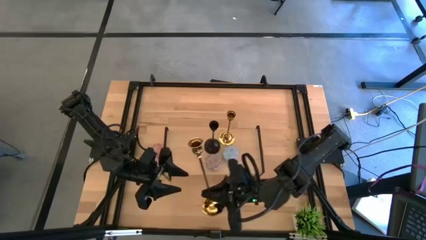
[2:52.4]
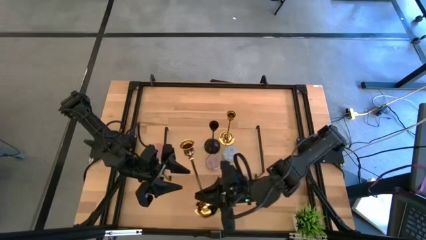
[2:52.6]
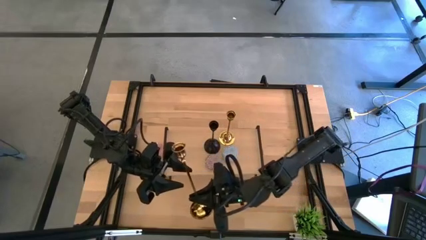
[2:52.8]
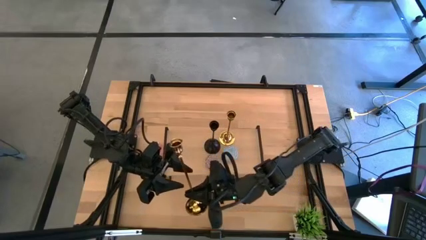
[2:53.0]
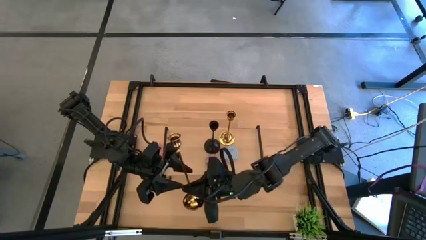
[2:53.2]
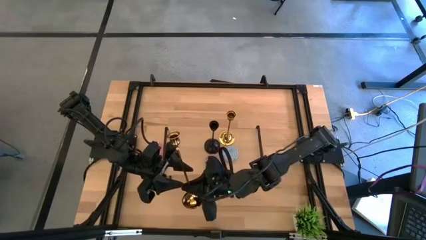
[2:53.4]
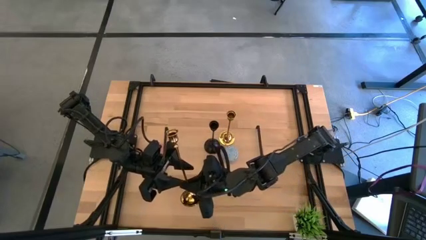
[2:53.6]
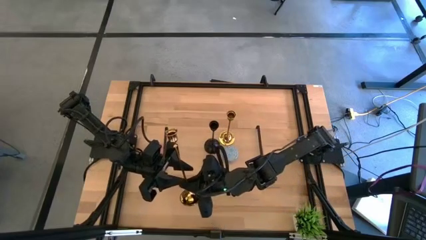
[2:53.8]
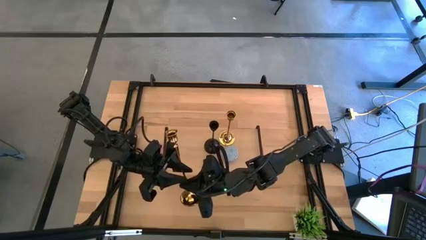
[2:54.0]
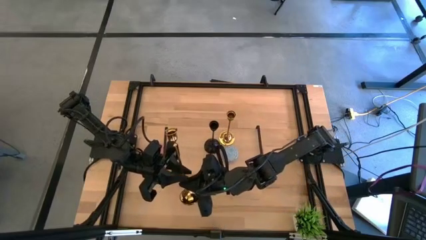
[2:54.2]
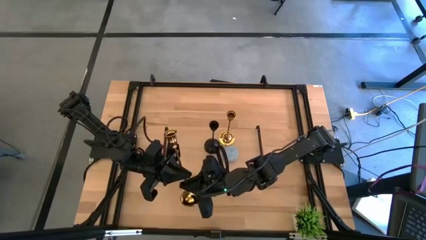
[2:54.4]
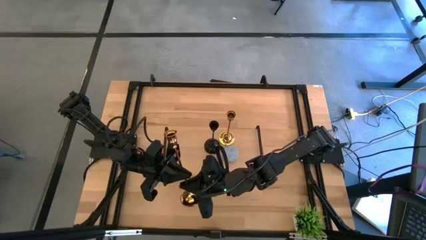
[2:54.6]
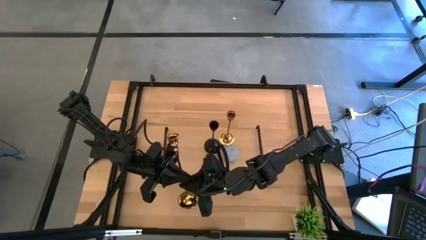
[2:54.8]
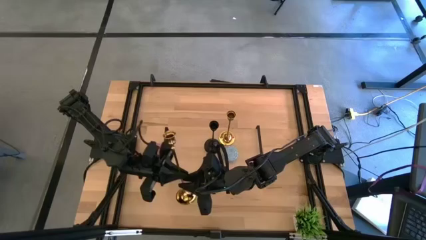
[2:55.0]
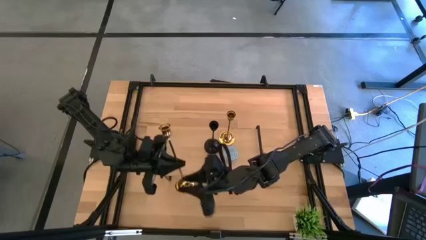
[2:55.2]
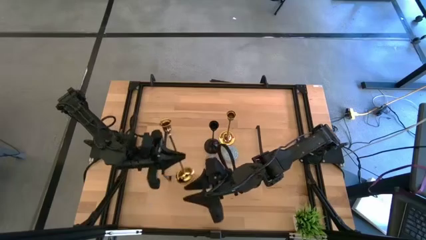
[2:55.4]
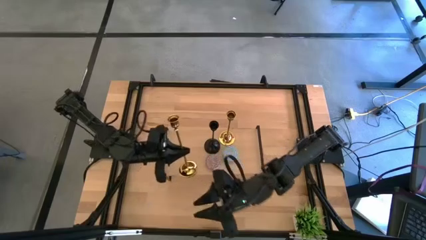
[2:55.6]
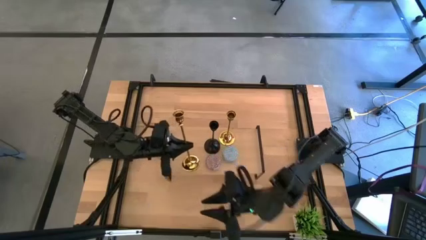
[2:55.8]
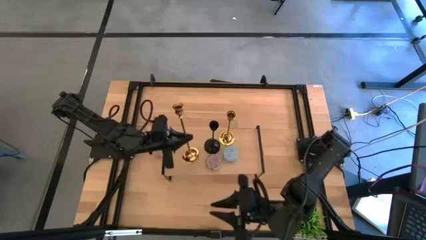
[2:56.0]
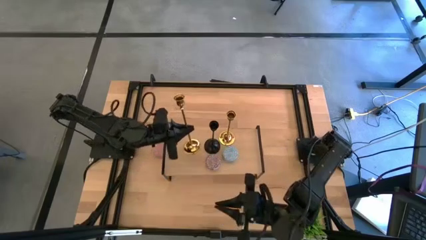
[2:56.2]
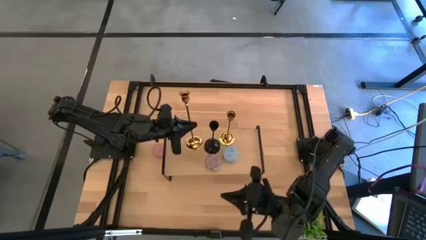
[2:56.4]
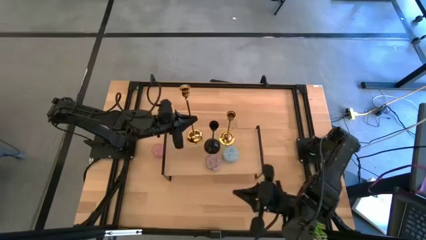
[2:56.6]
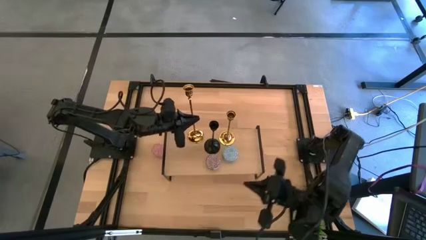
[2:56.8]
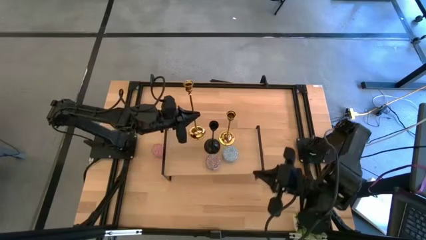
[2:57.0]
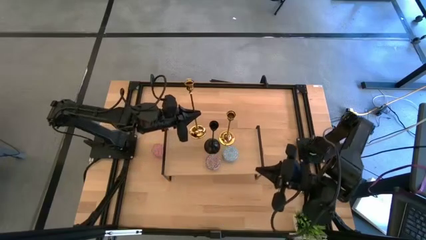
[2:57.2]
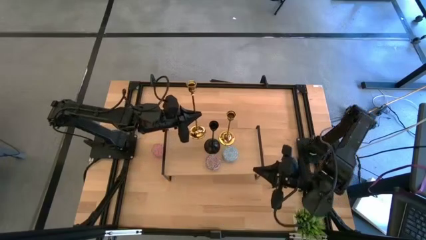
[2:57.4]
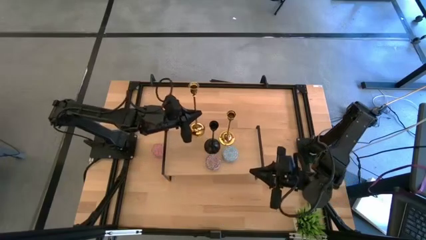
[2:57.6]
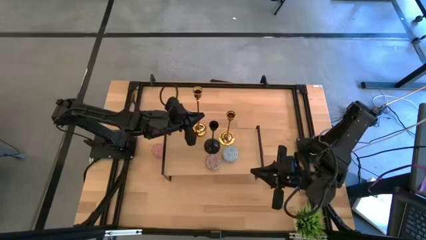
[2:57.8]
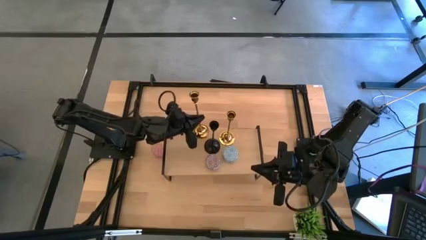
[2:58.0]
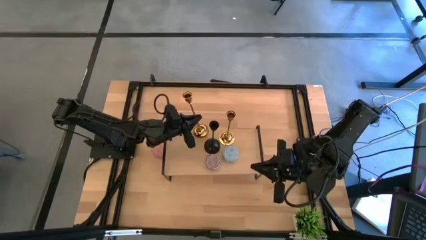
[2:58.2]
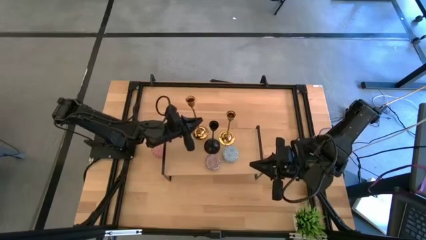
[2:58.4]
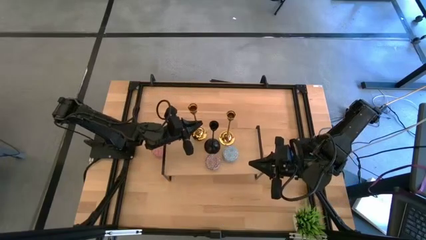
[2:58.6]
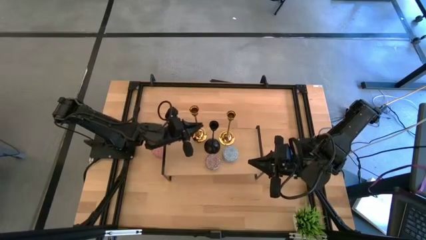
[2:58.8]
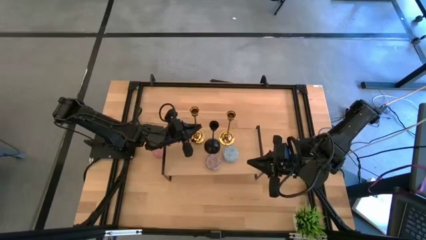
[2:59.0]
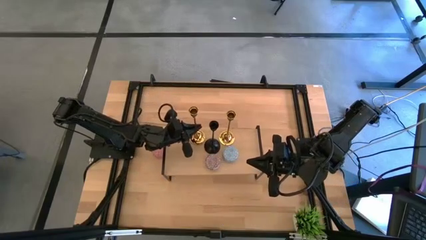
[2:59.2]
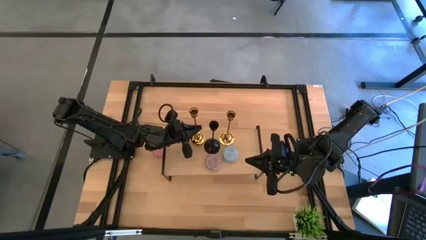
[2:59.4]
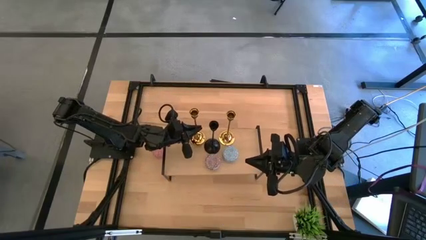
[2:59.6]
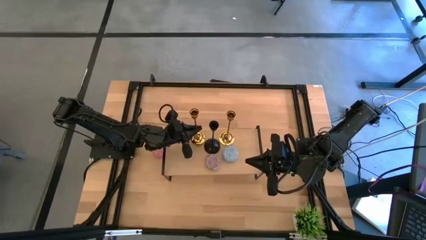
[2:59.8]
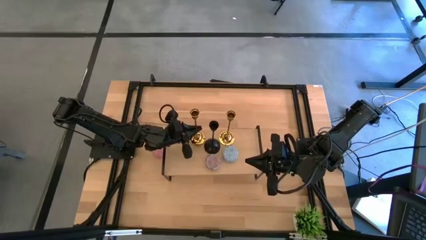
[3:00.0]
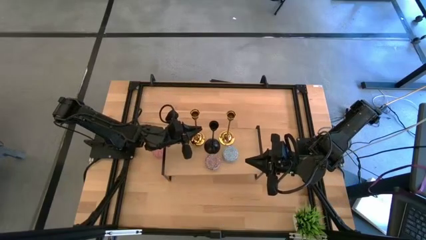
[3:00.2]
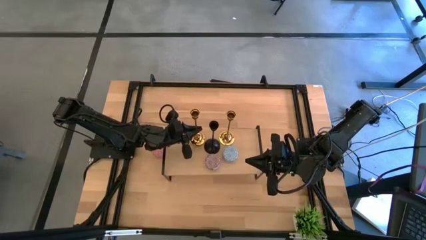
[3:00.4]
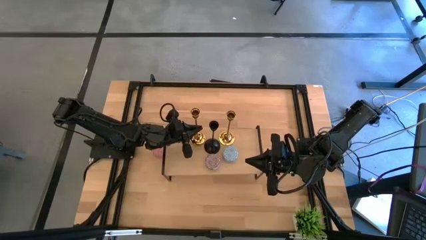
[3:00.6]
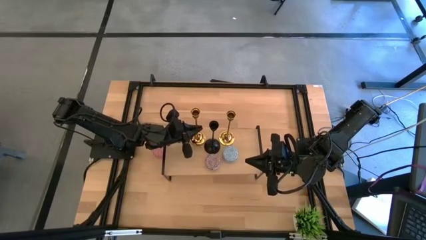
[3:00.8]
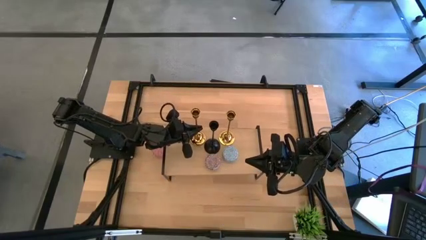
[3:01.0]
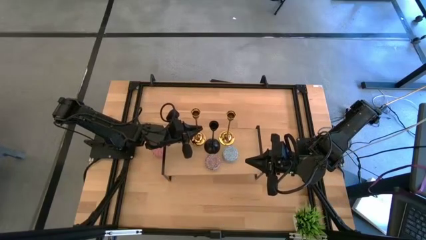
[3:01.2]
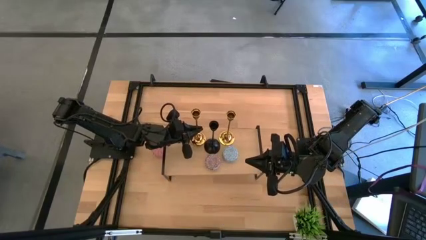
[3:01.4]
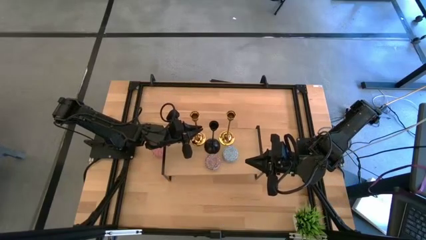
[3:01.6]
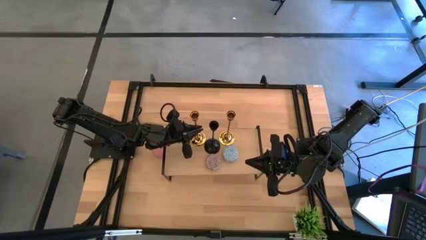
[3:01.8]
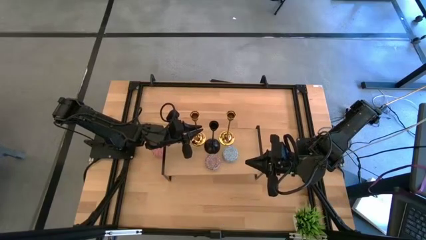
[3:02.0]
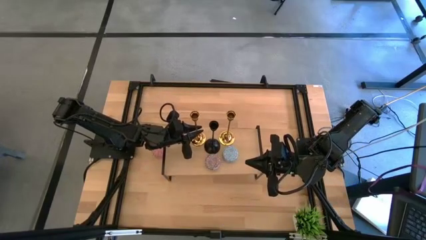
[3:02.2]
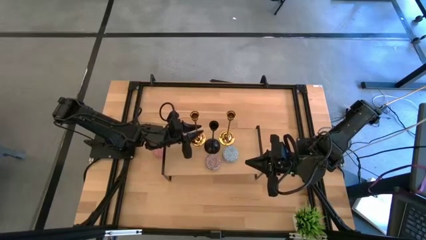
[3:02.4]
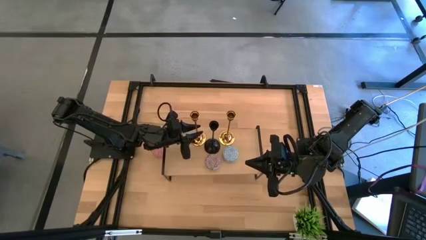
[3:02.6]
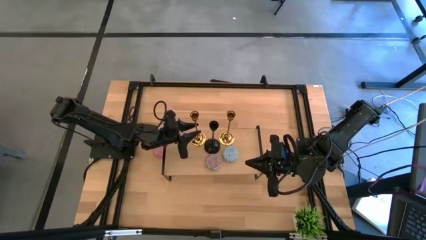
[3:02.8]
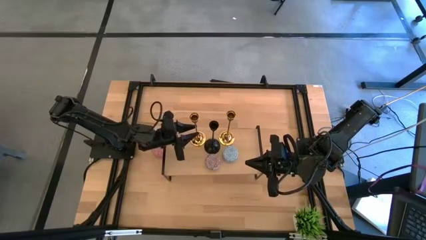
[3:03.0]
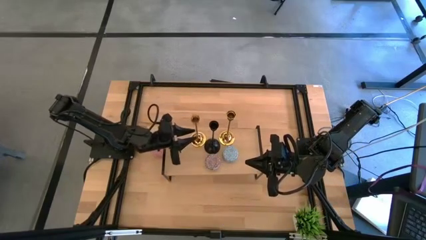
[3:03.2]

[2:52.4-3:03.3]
Task: Pick & Place candle stick holders
Put the gold candle holder on the shelf
